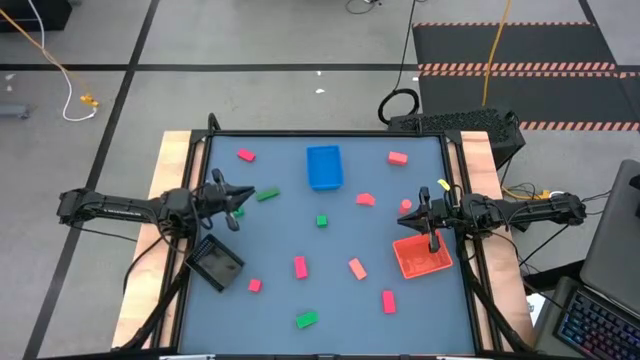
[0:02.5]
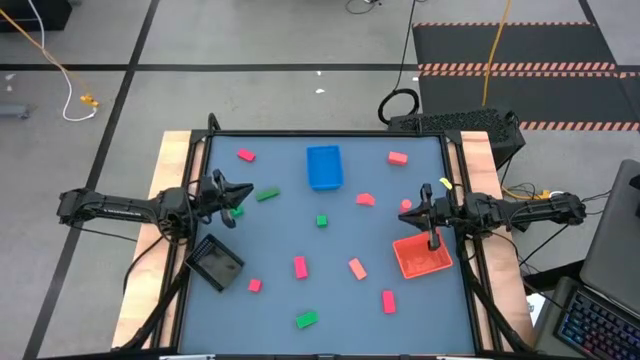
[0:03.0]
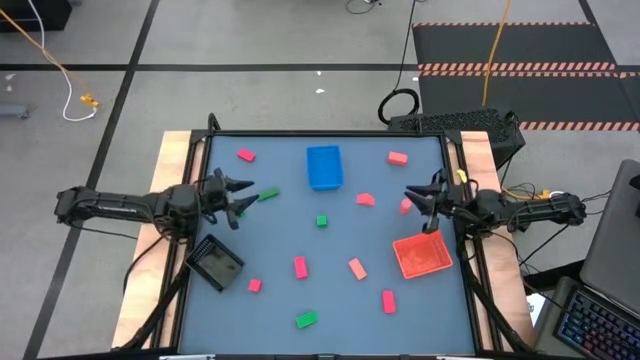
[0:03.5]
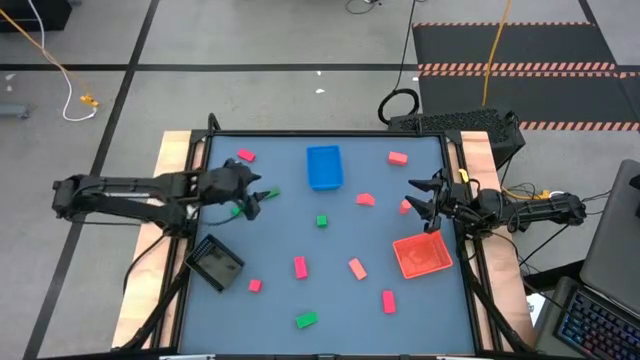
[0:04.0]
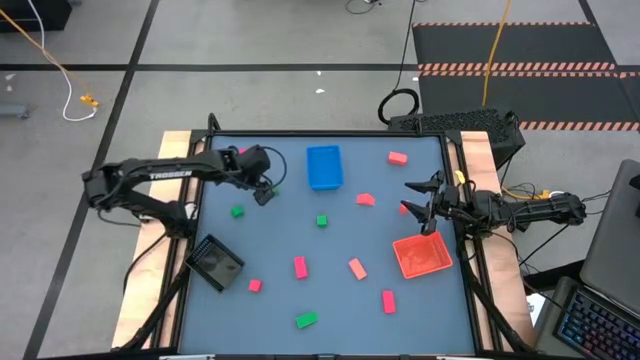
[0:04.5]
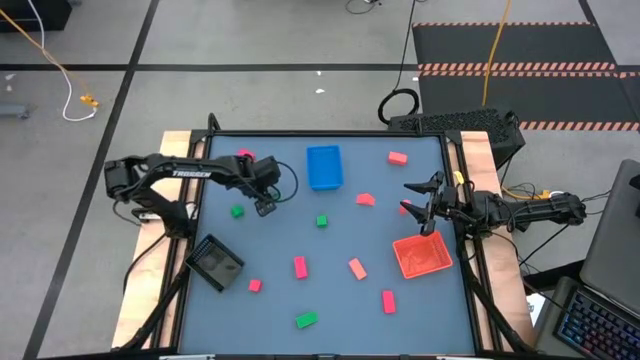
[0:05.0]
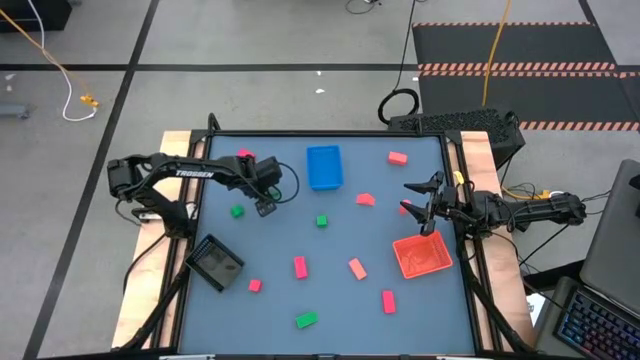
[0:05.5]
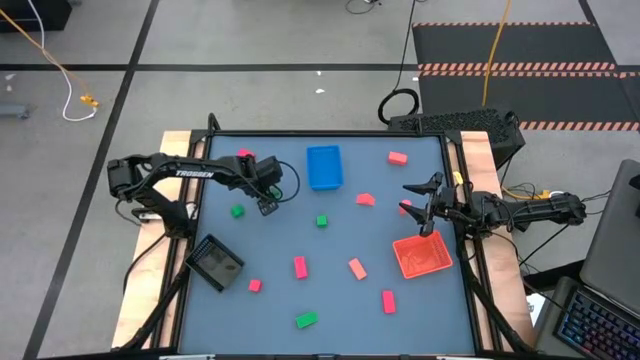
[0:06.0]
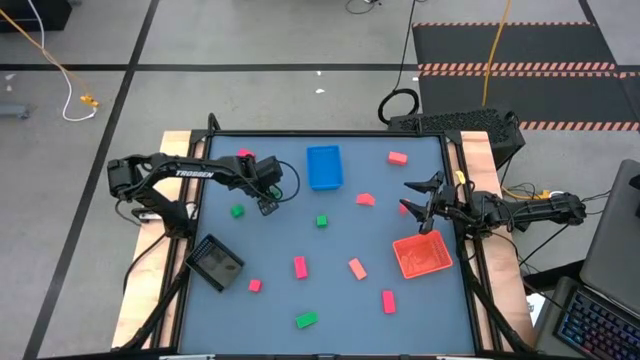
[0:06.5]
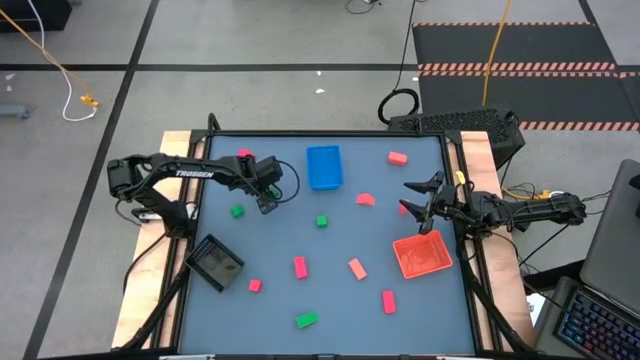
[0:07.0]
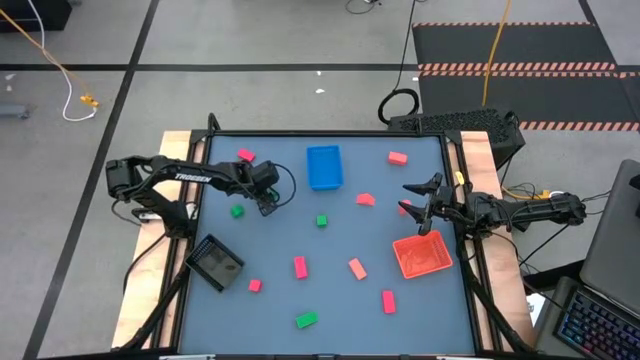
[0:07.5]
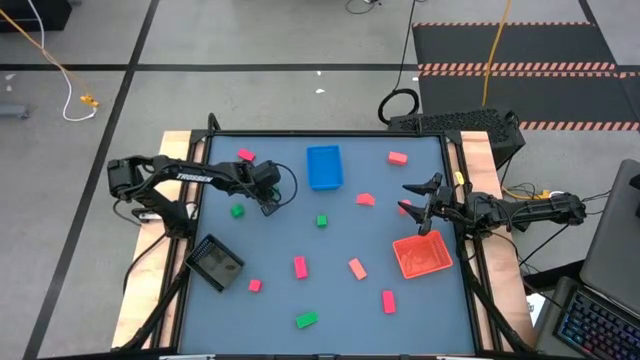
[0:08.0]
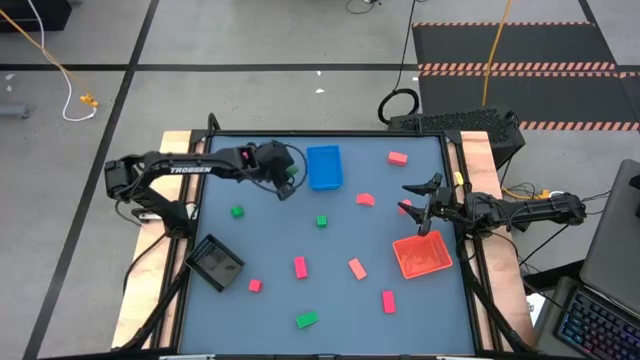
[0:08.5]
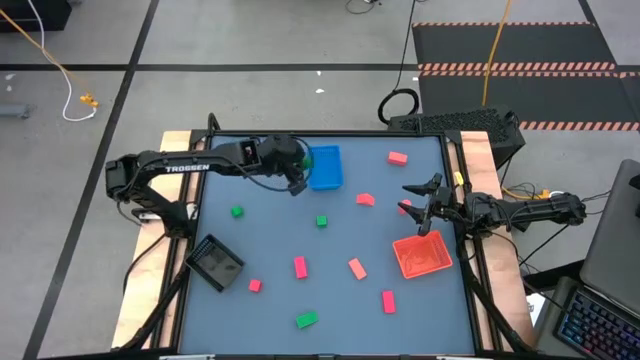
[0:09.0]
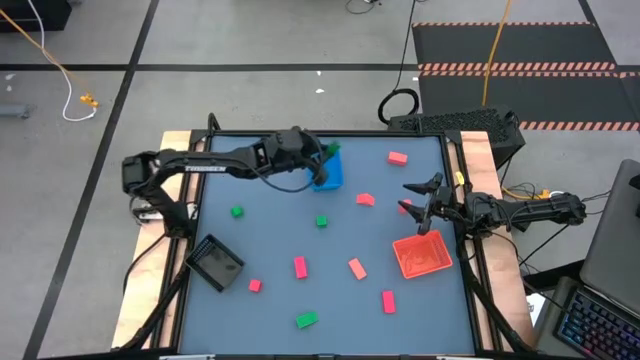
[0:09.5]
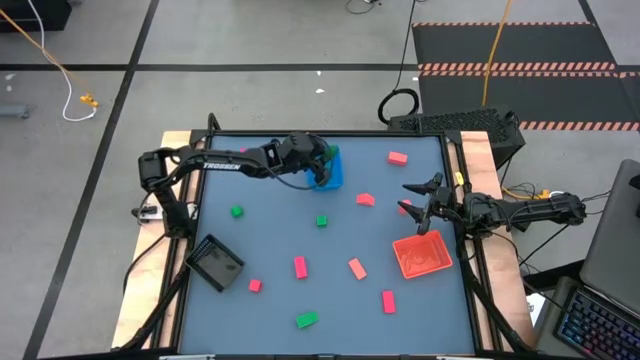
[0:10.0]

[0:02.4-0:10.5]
Task: Sort & place blocks by color
Put the green block into the blue bin

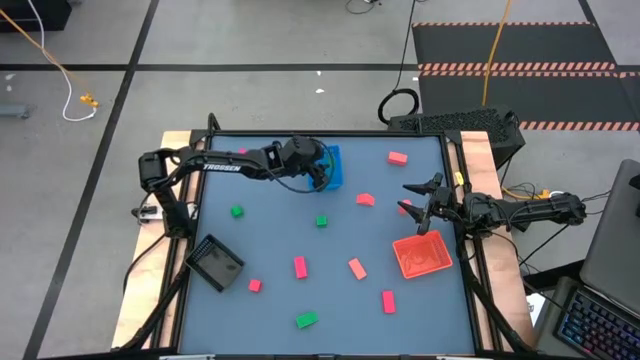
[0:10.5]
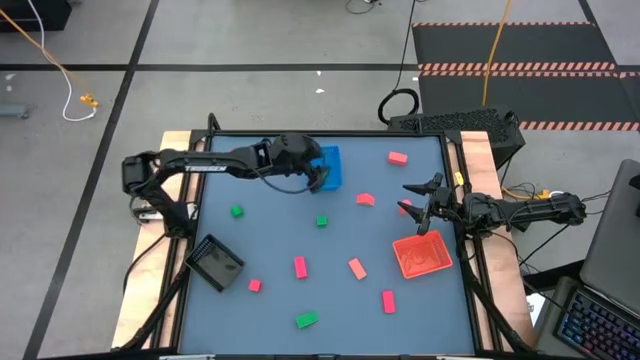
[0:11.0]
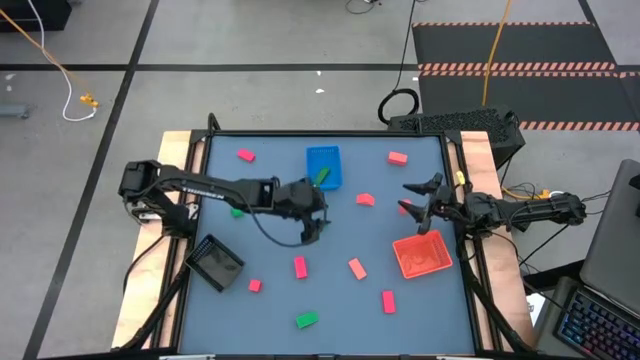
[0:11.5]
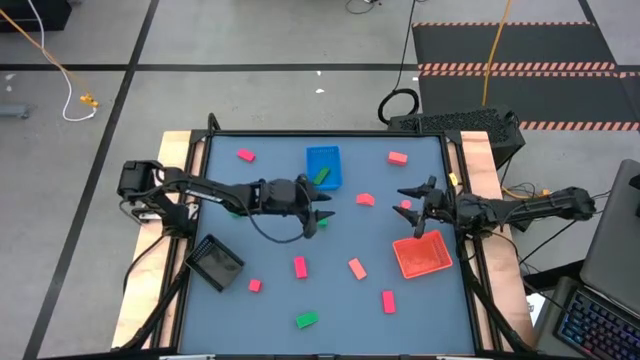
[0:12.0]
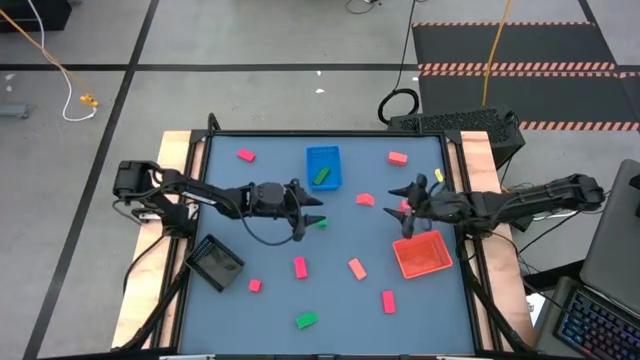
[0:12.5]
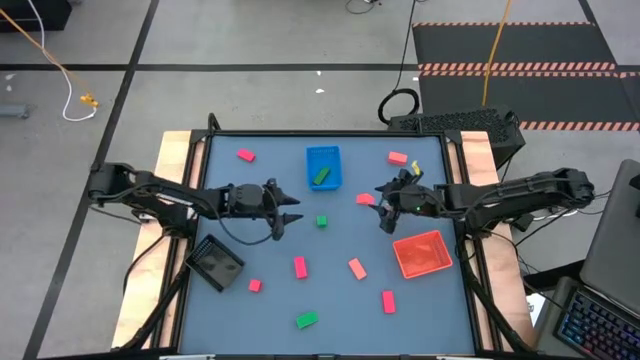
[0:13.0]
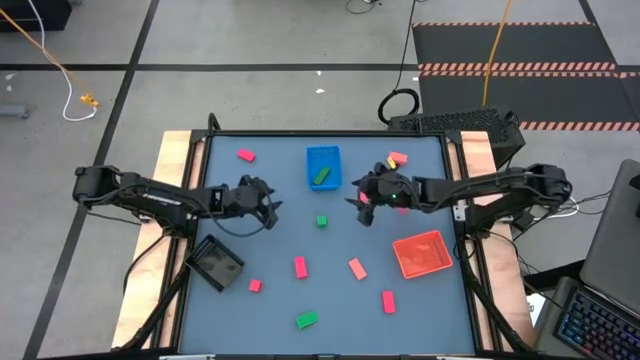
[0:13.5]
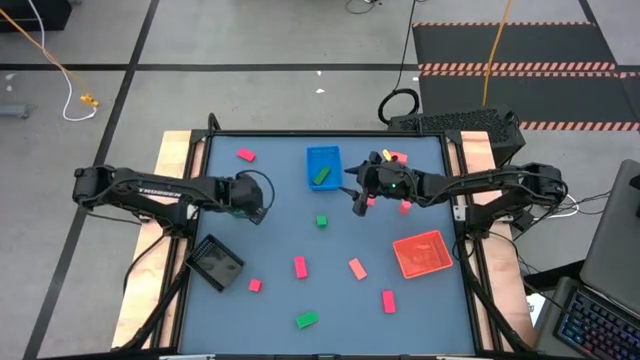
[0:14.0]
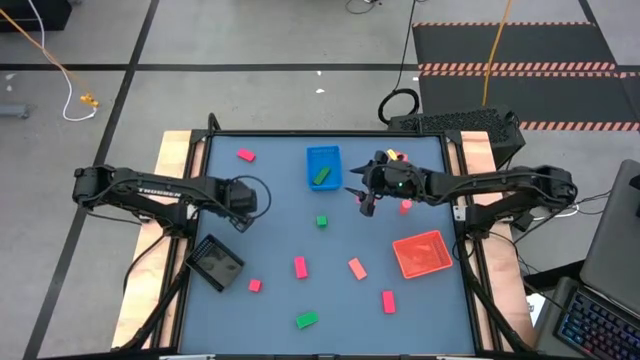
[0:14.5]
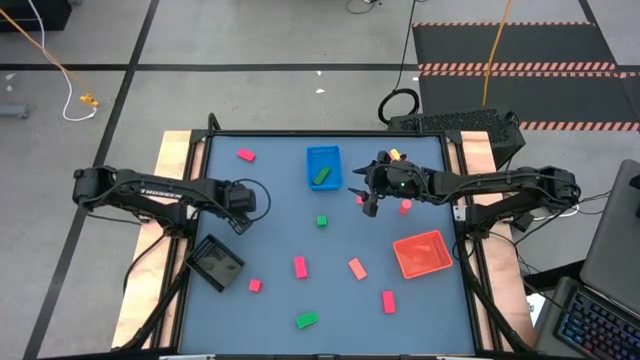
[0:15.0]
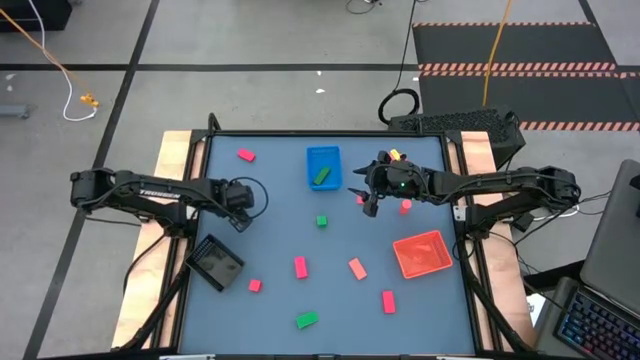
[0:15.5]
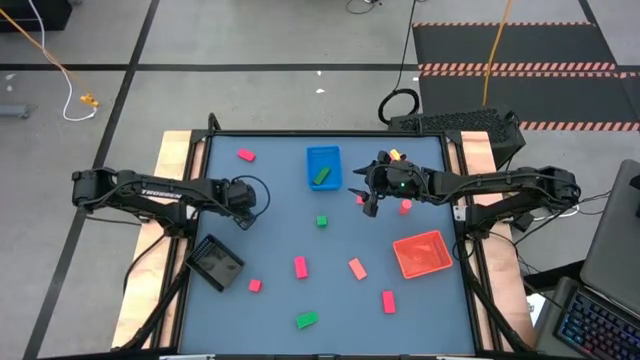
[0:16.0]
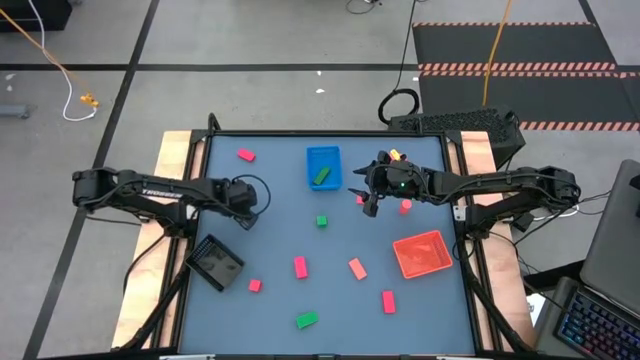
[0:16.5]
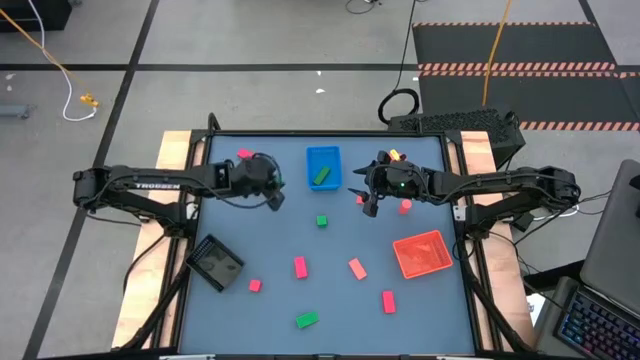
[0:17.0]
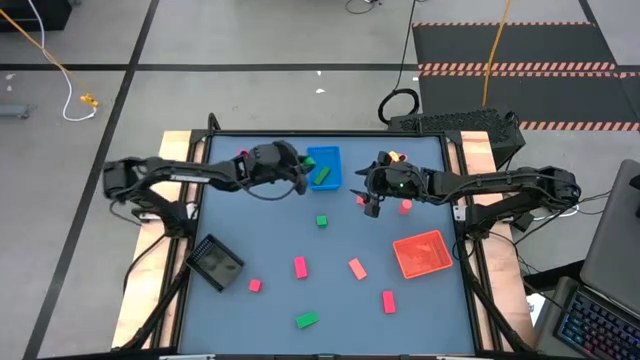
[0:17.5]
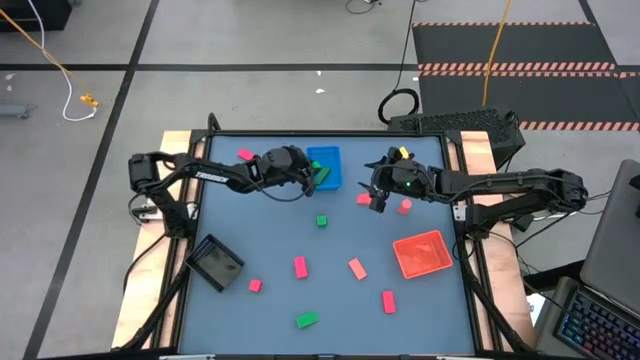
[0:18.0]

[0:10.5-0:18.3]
Put the green block into the blue bin

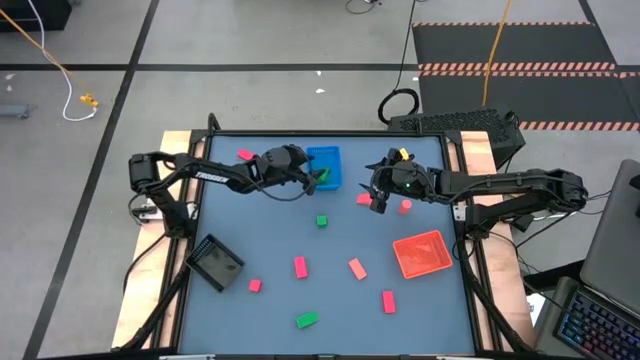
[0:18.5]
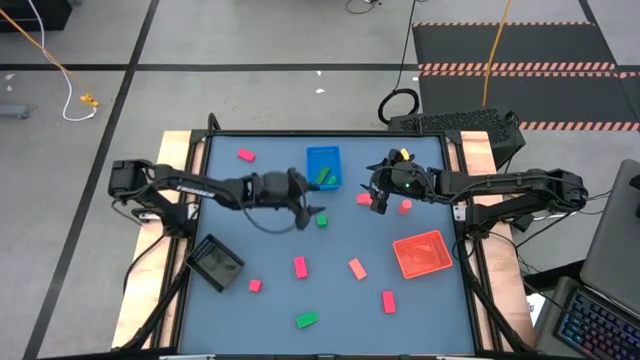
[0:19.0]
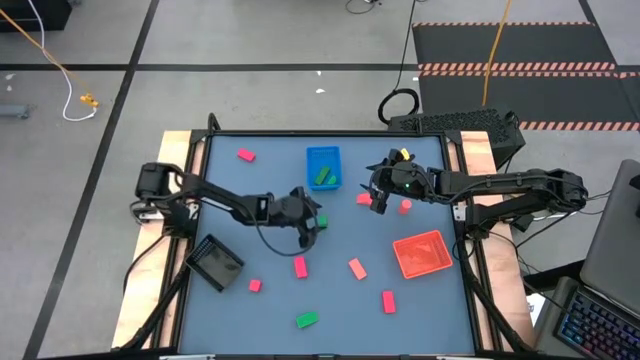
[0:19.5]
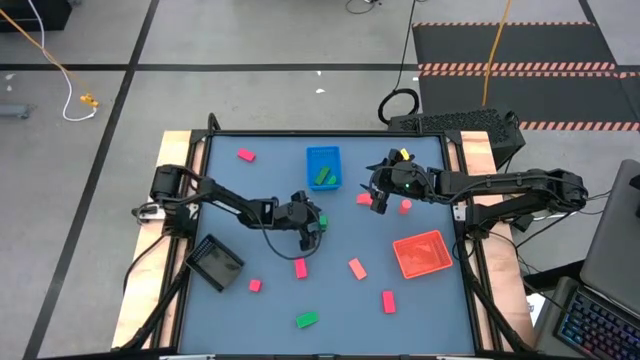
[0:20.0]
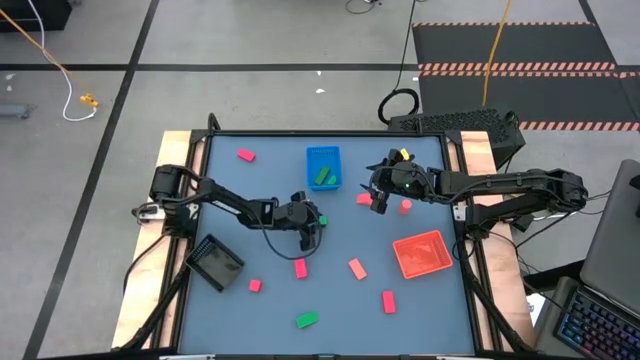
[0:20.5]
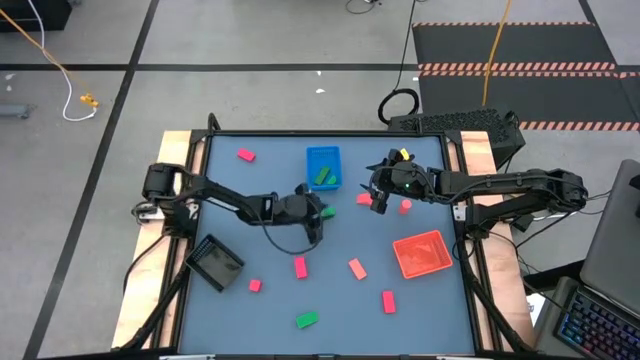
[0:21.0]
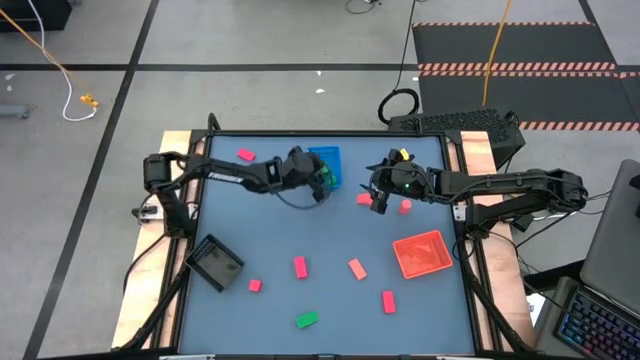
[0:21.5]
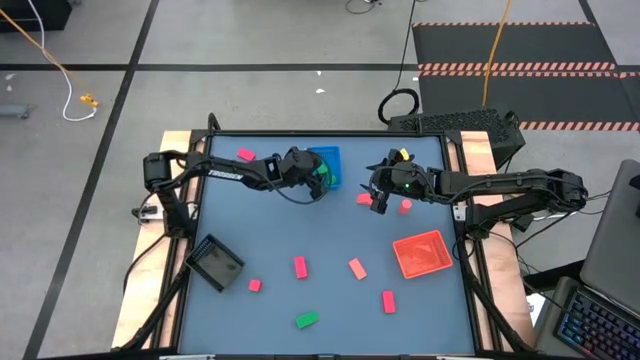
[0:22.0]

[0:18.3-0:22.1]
Put the green block into the blue bin

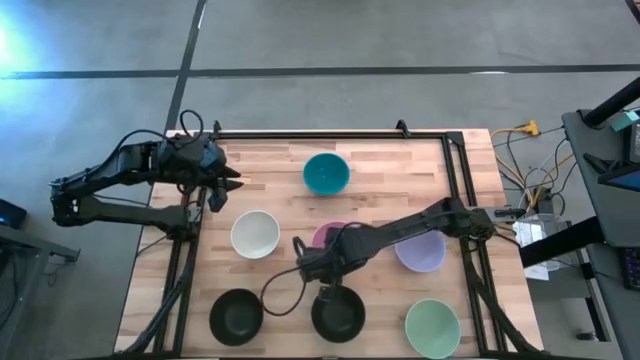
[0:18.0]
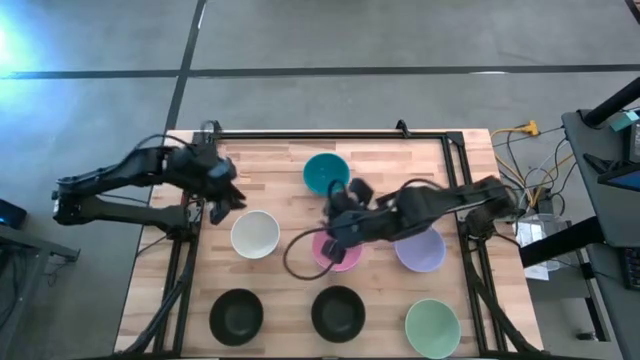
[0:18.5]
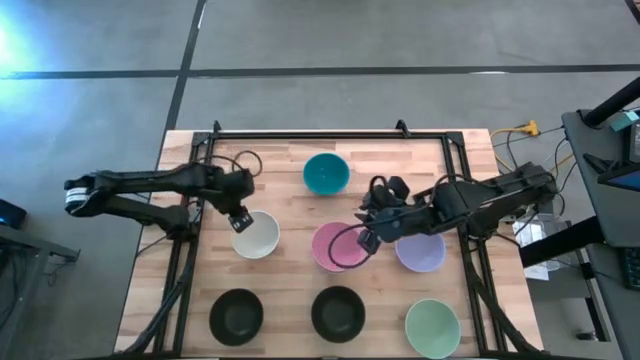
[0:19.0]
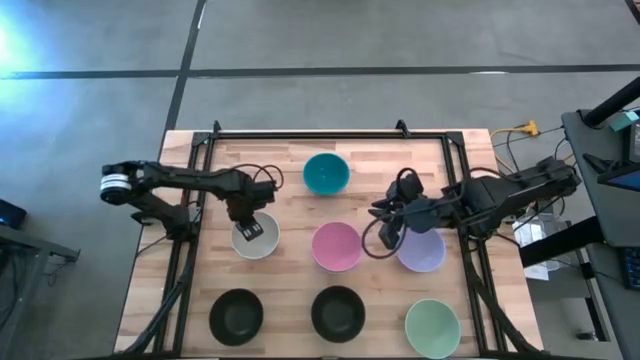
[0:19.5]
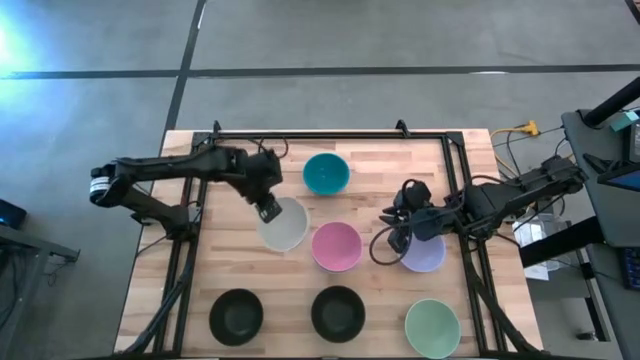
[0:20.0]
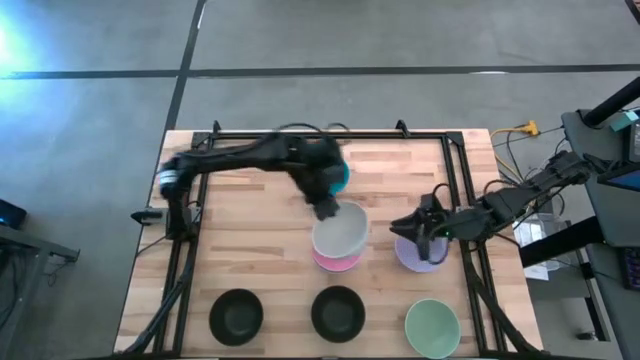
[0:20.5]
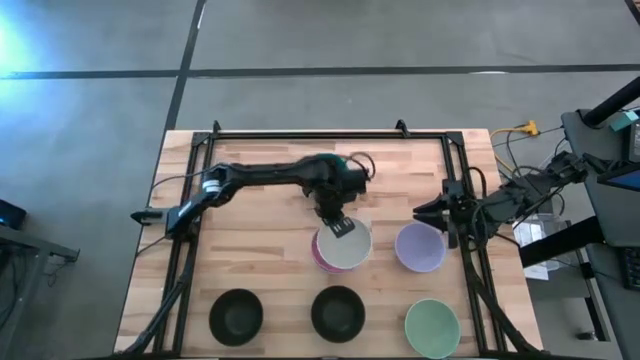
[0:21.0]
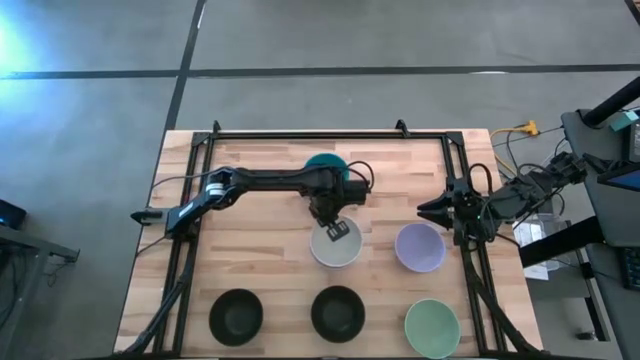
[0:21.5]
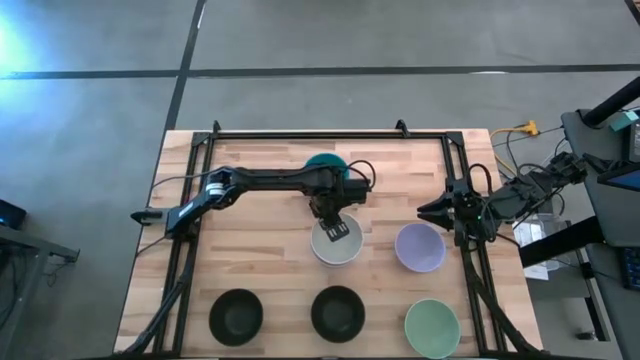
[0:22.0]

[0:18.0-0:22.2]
Task: Nest bowls inside each other
Stack the white bowl on top of the pink bowl
